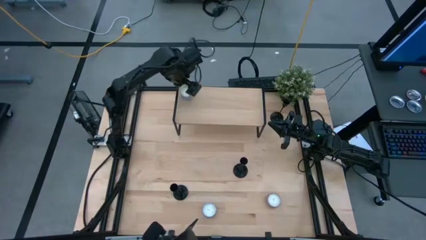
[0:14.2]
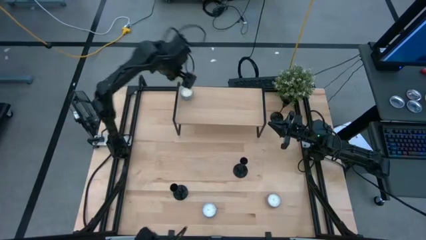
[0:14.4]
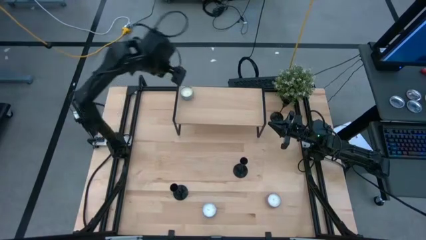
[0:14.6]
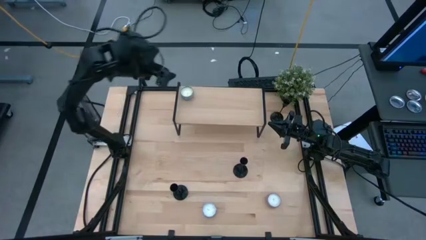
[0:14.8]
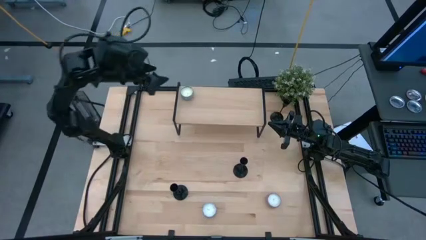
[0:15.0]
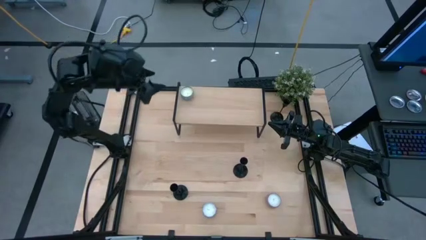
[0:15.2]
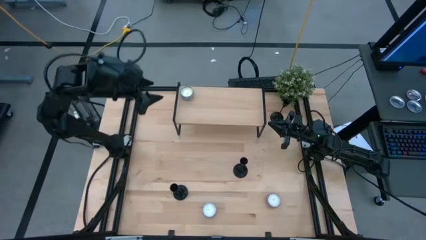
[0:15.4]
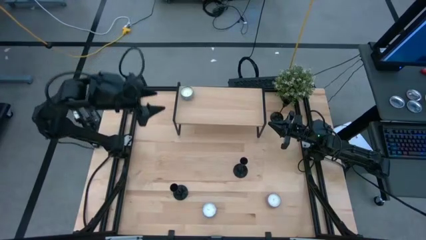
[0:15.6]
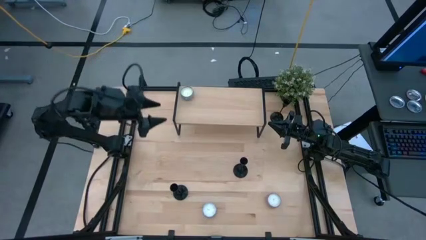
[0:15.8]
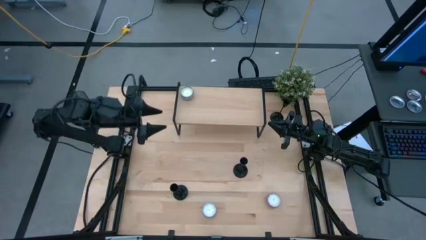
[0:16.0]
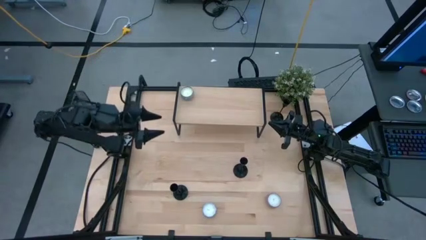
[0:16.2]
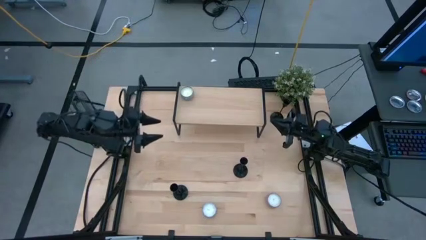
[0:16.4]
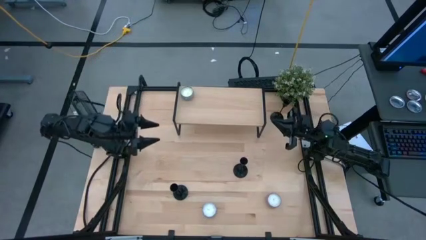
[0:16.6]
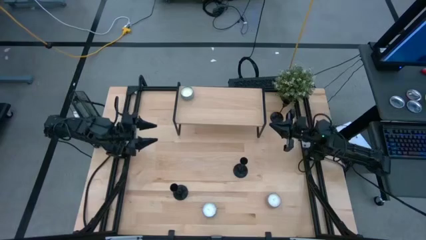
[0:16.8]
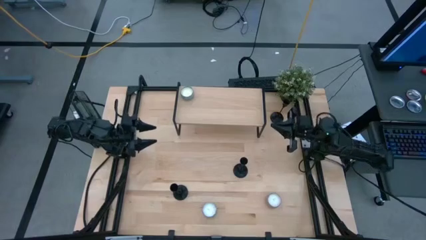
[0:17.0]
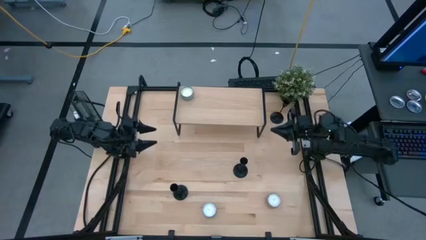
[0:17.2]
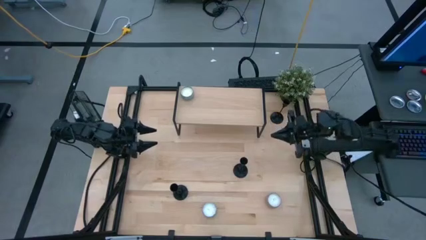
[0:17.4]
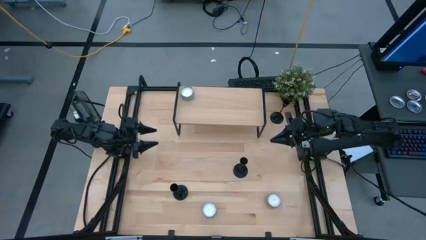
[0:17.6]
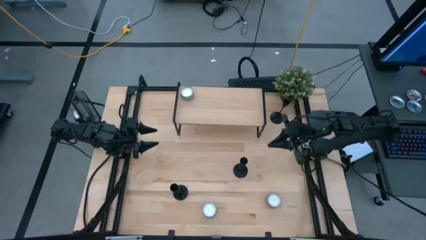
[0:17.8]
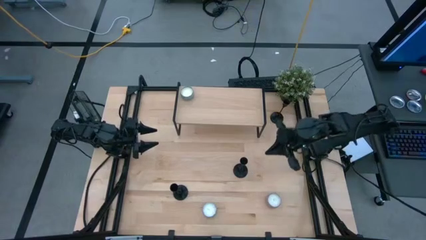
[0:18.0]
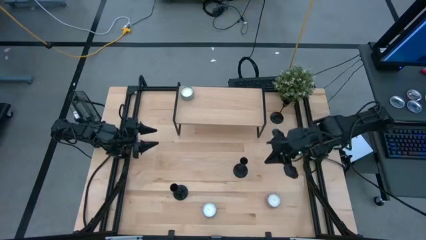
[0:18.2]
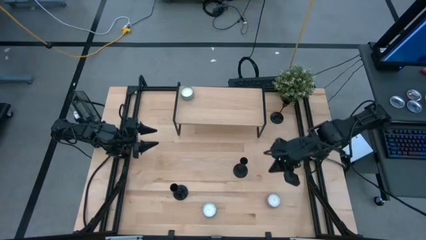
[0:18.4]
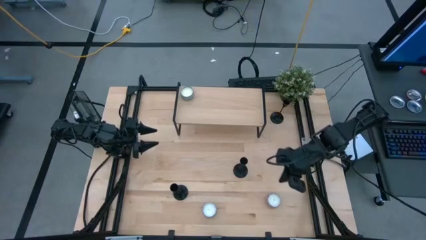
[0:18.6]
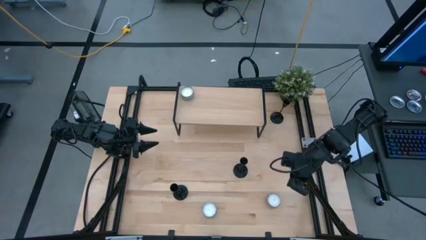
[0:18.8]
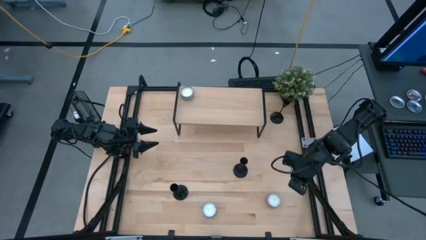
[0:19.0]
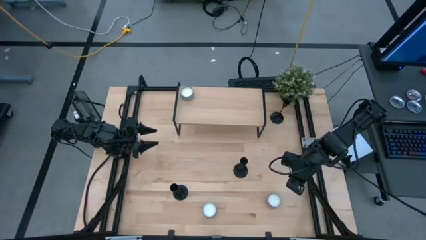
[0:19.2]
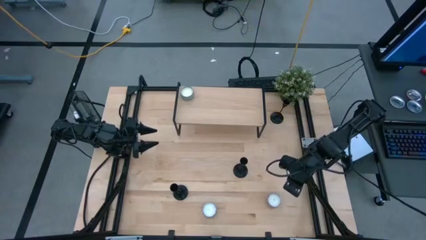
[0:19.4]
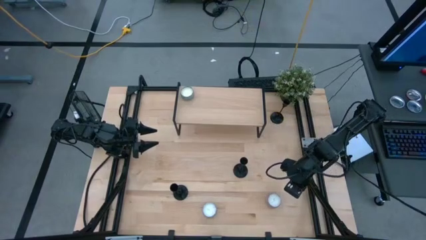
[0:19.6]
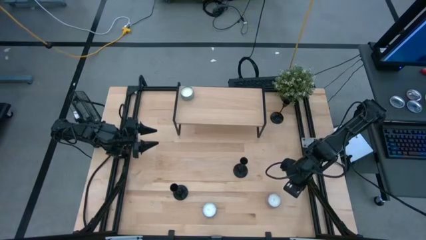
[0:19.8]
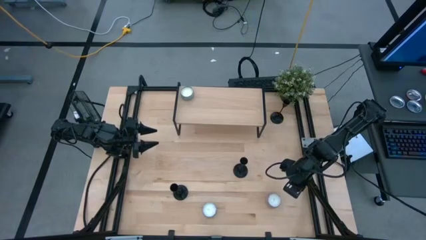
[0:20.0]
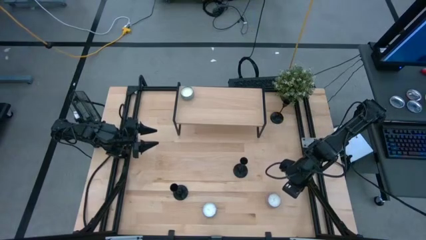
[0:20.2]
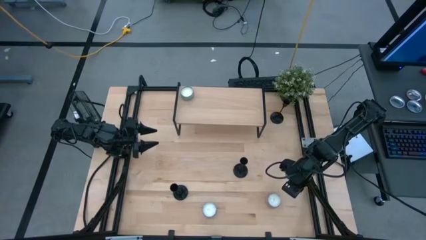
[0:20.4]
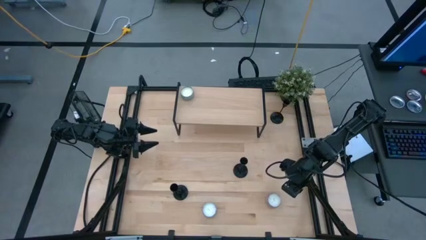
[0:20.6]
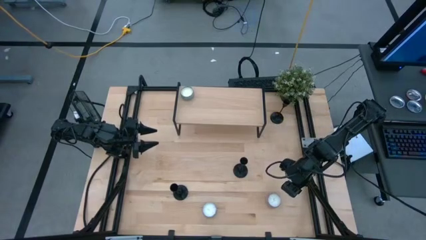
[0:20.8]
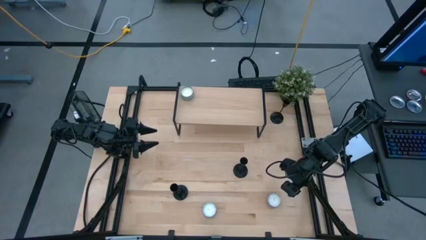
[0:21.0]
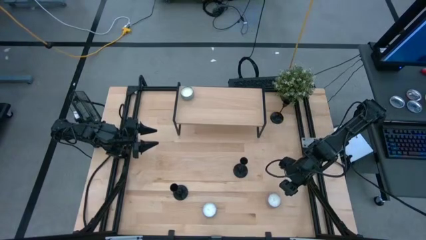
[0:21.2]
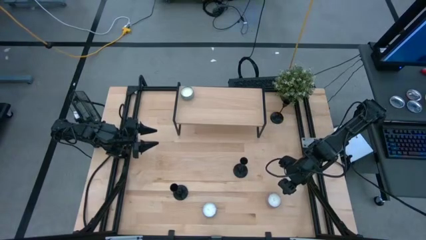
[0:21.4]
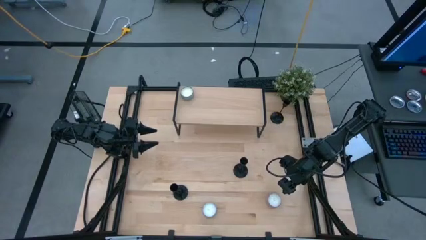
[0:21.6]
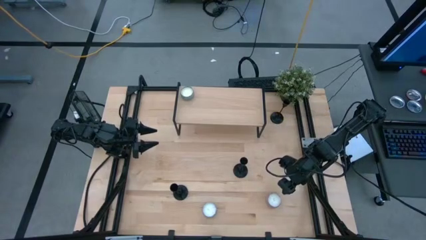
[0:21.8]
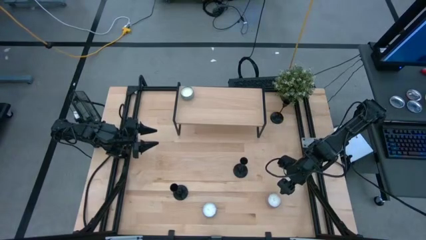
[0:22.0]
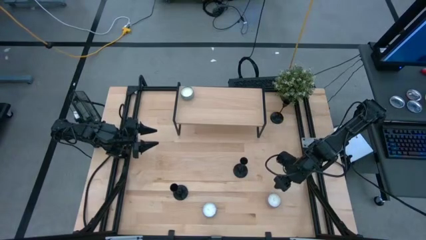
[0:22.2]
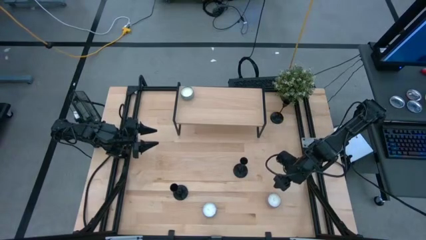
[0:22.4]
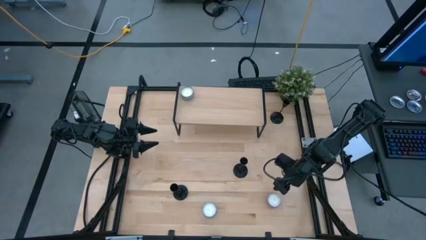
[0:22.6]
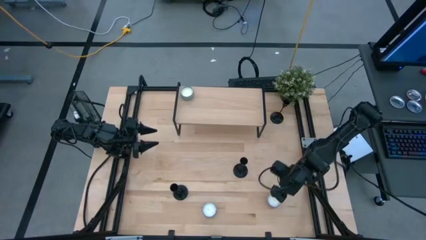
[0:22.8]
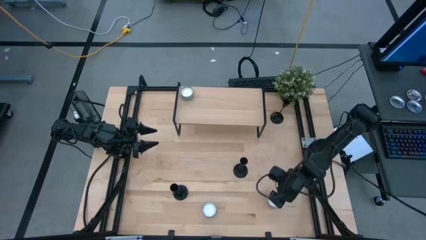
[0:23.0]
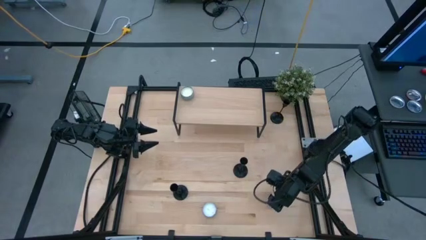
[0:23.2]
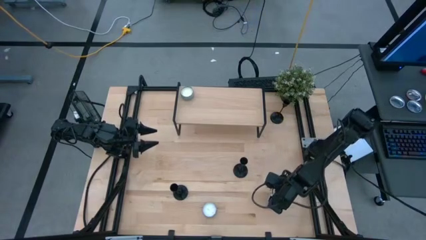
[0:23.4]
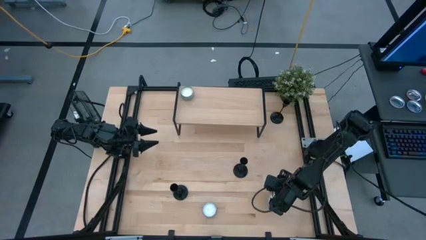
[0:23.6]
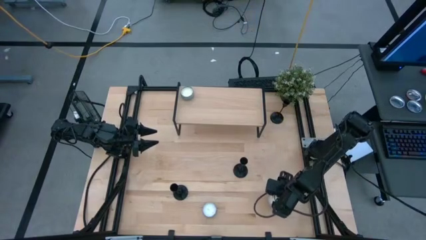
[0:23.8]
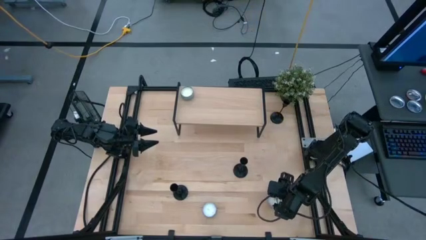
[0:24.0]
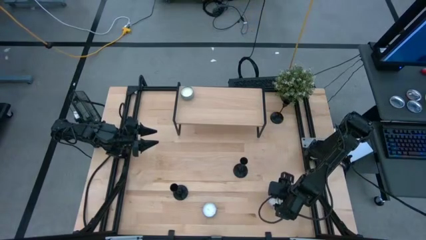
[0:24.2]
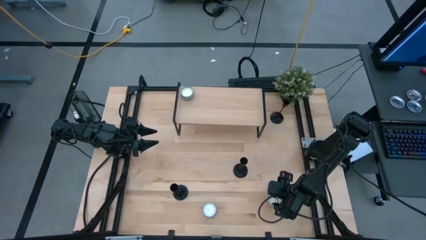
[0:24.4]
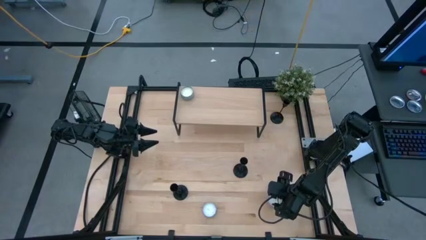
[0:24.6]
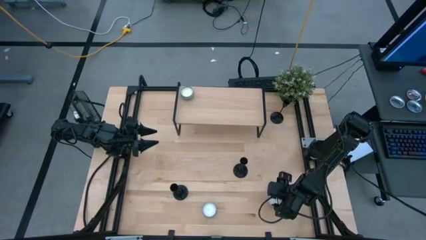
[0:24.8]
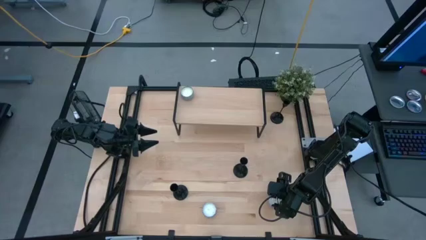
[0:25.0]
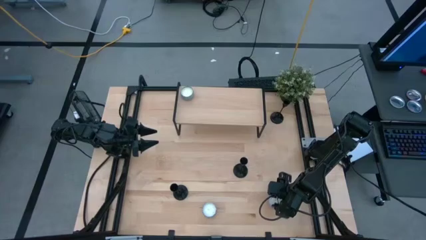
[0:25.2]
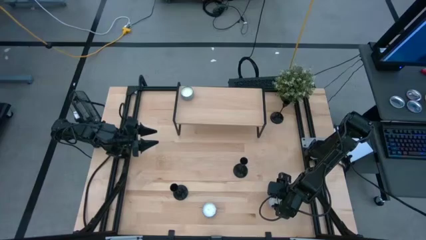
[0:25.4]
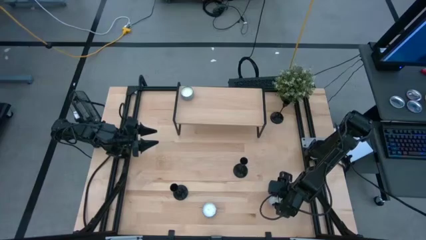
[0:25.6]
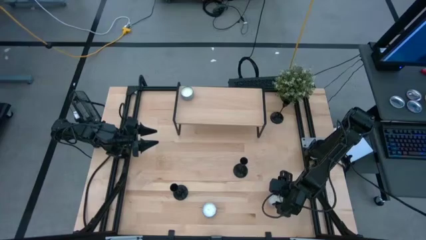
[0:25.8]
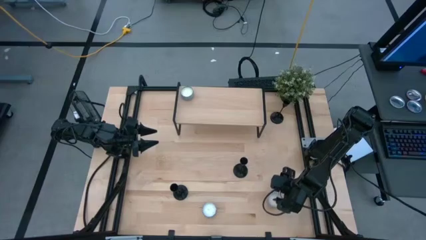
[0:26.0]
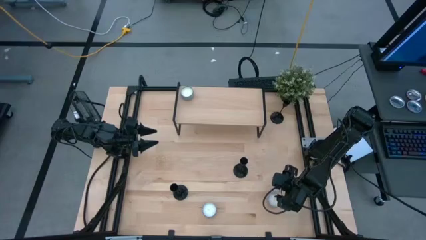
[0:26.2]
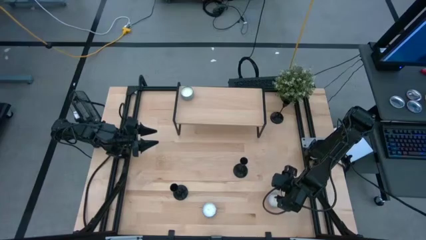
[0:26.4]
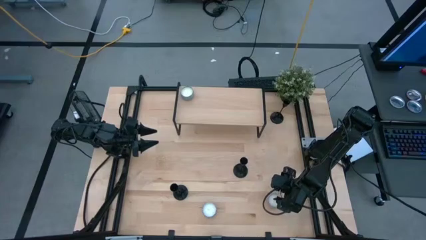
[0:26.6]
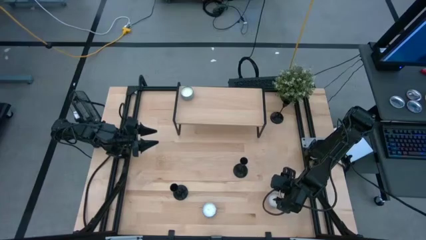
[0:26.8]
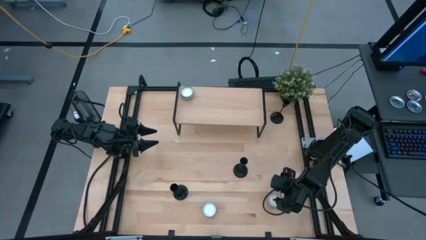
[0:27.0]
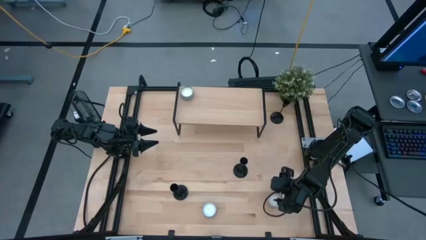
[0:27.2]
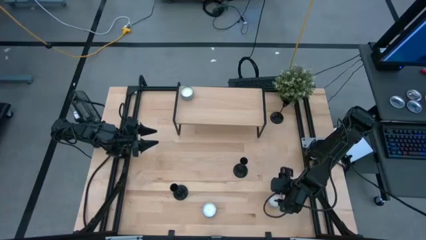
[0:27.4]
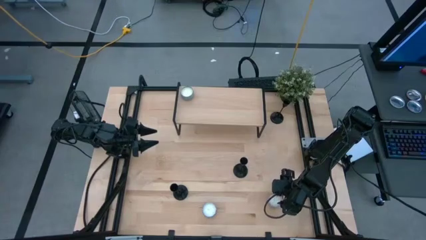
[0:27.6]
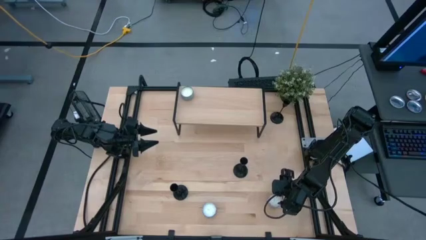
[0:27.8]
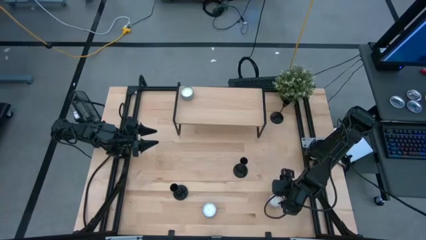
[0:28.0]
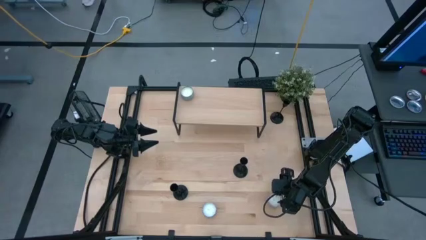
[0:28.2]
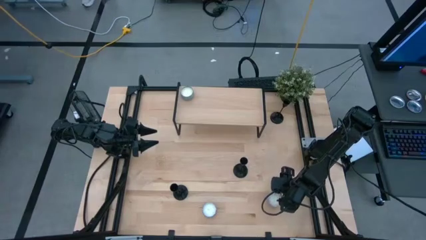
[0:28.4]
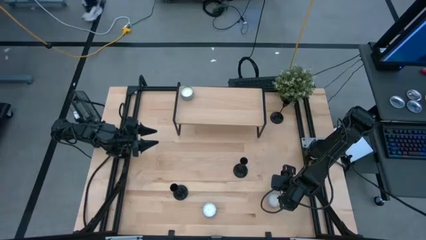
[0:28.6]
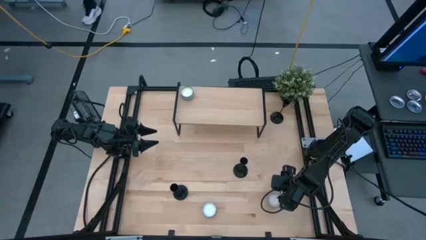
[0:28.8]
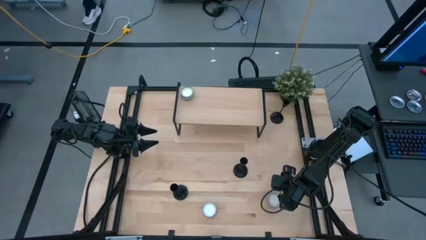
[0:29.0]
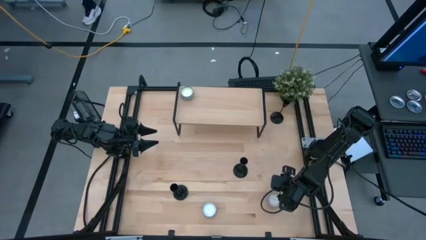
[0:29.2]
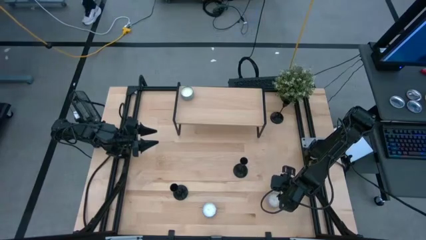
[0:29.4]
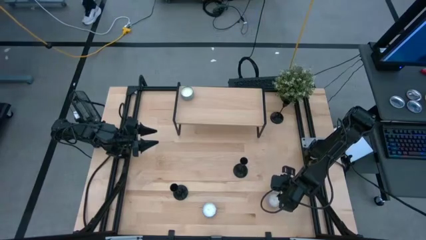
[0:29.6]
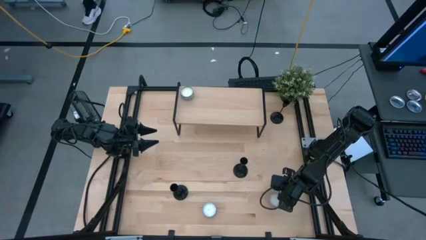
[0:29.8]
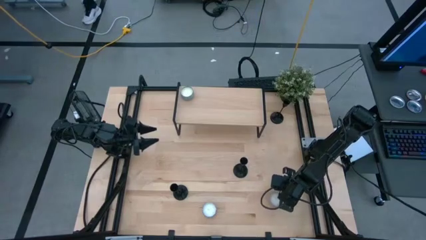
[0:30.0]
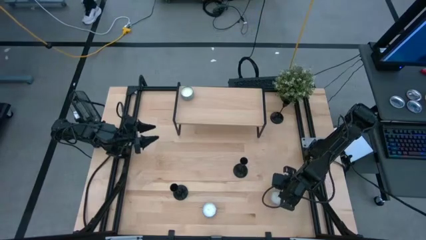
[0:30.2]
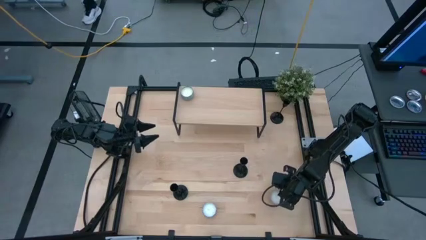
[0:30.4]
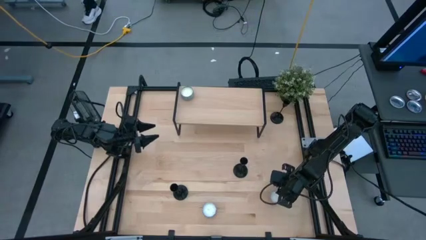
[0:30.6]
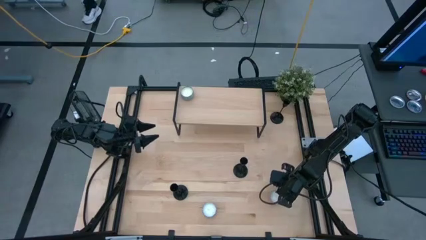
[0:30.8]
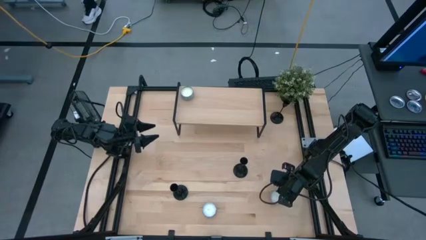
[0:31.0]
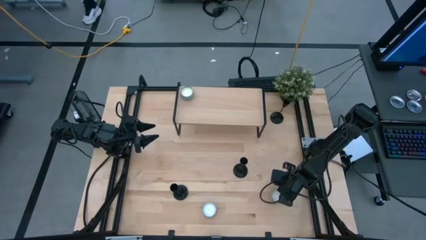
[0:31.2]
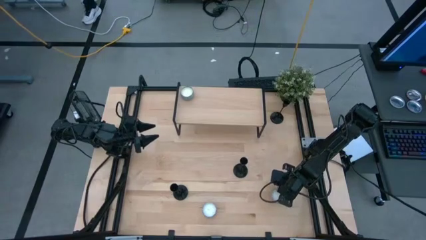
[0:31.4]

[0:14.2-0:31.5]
Task: Pick & Place candle stick holders
Put the pink scented candle on the shelf
